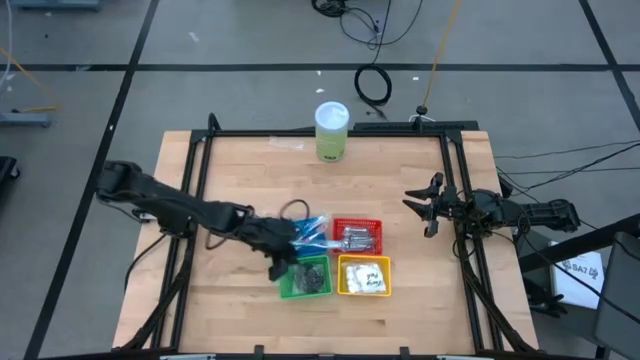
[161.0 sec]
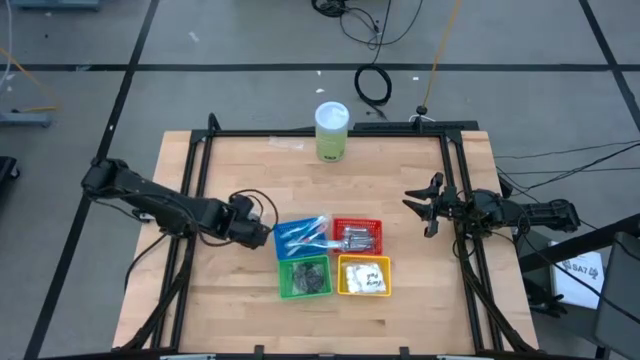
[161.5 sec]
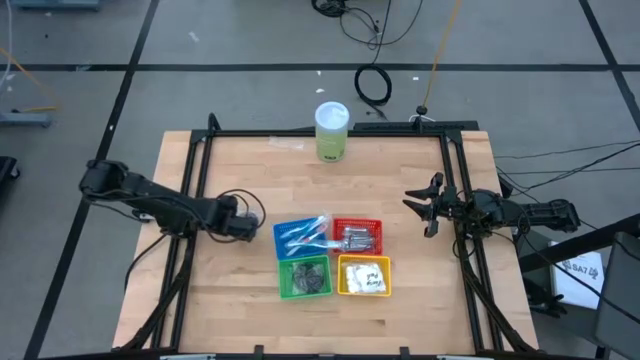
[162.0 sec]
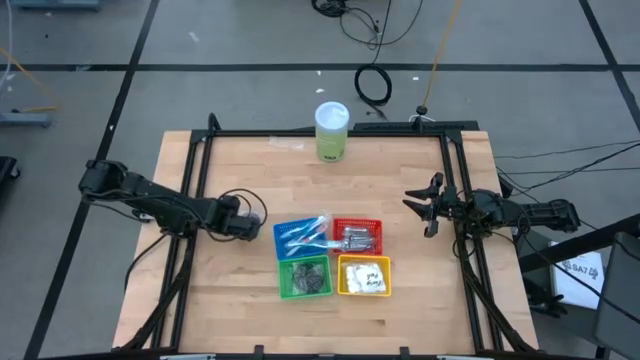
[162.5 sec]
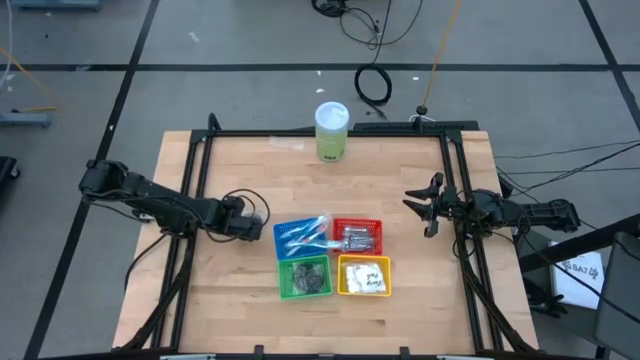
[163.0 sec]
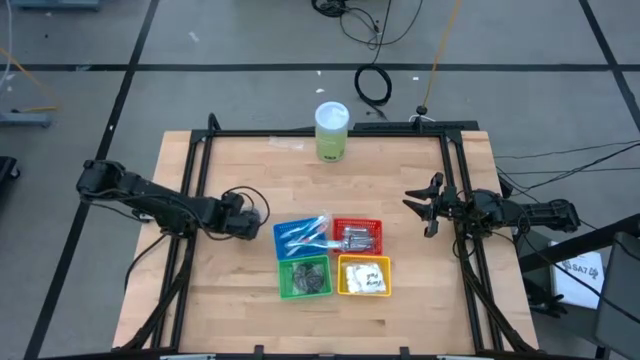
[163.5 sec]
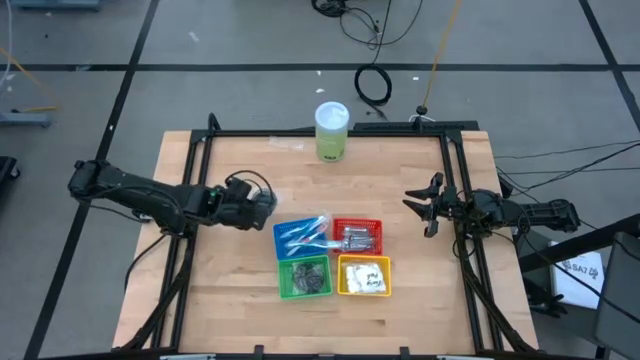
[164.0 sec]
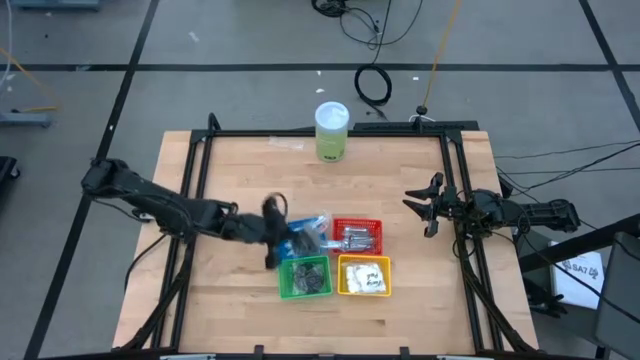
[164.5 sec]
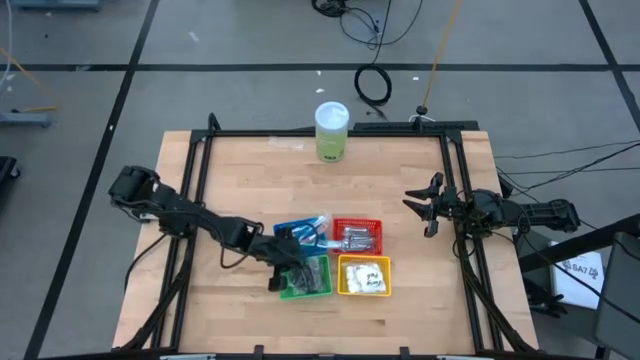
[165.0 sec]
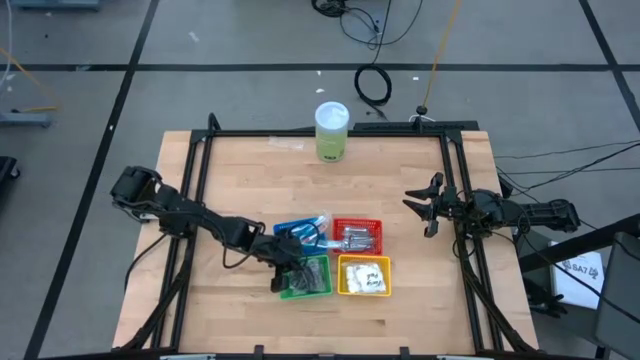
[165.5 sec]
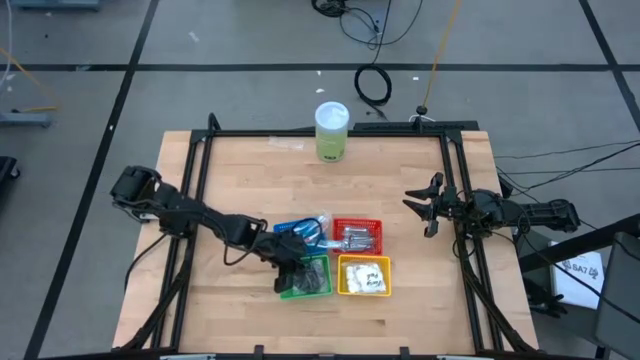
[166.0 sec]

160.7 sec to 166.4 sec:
Task: Pick & Place Travel size toiletries
Put the black hairbrush into the green basket

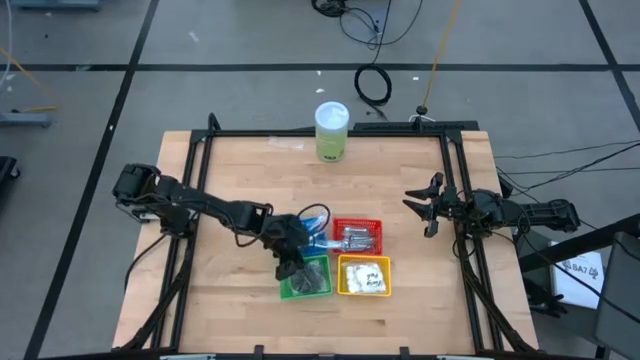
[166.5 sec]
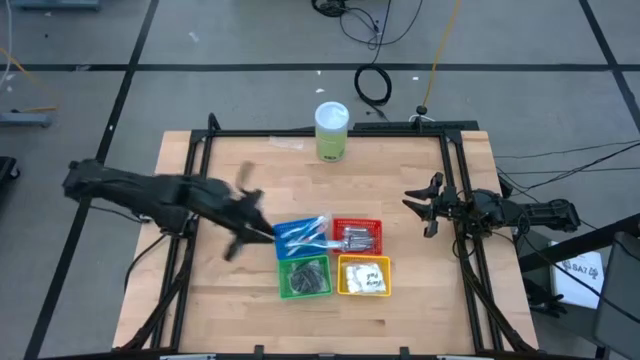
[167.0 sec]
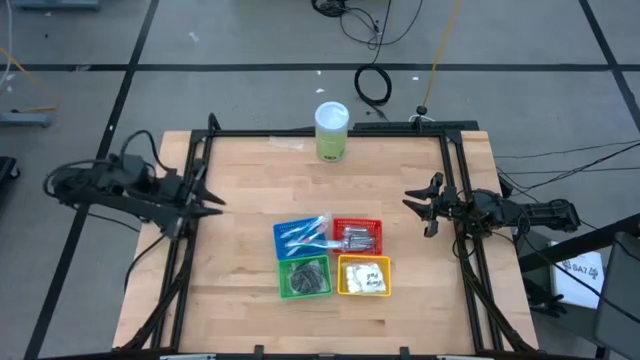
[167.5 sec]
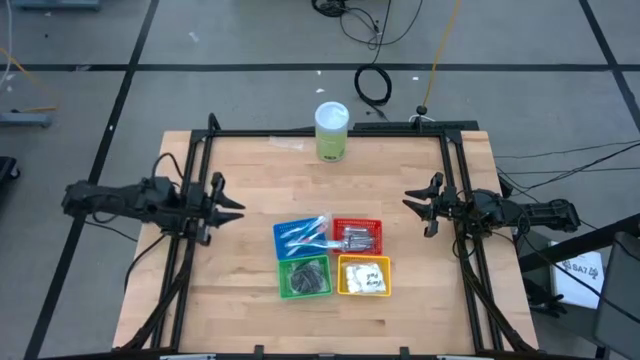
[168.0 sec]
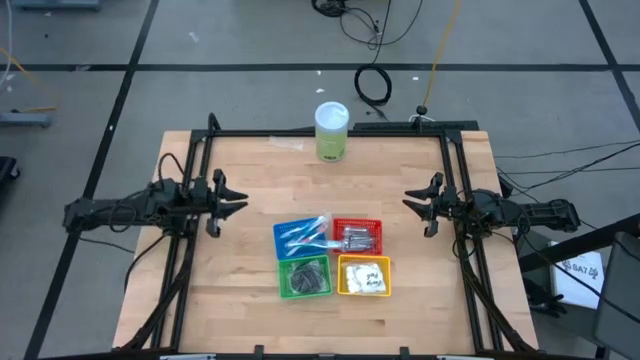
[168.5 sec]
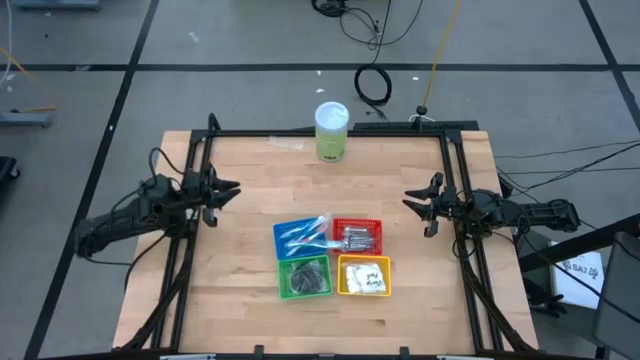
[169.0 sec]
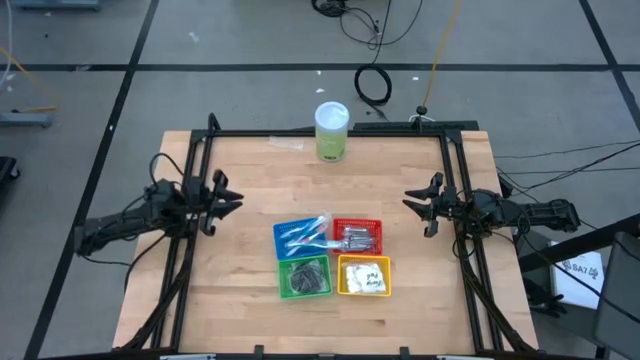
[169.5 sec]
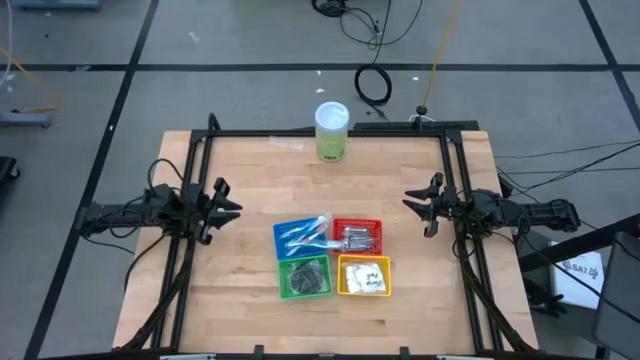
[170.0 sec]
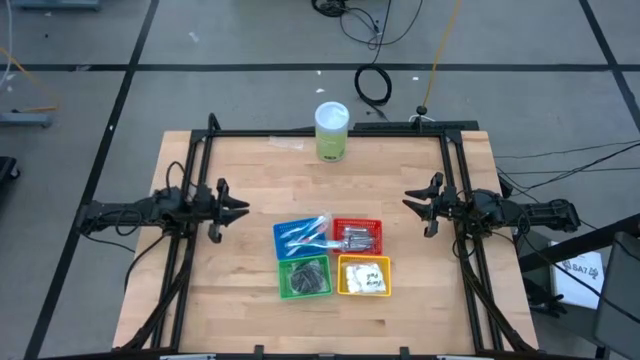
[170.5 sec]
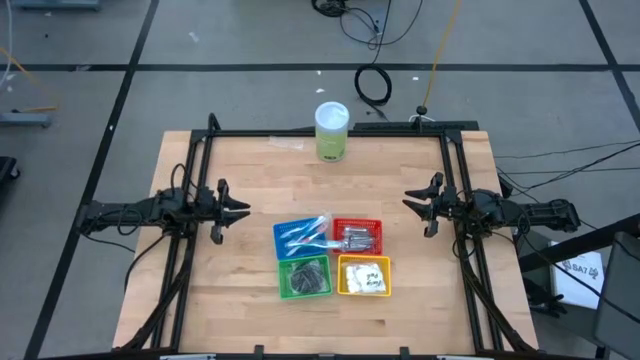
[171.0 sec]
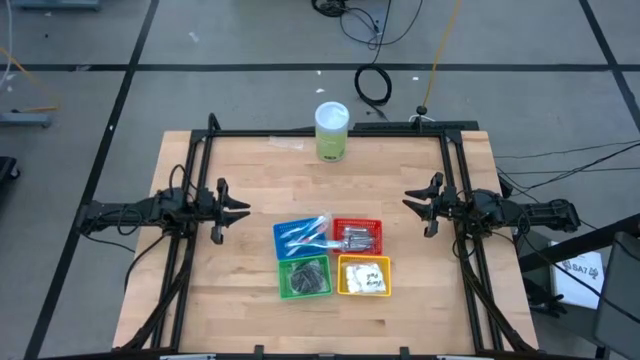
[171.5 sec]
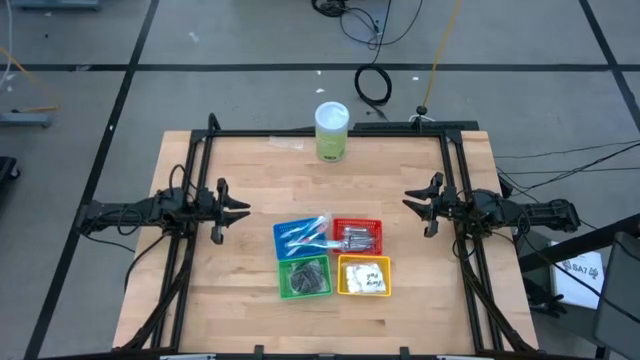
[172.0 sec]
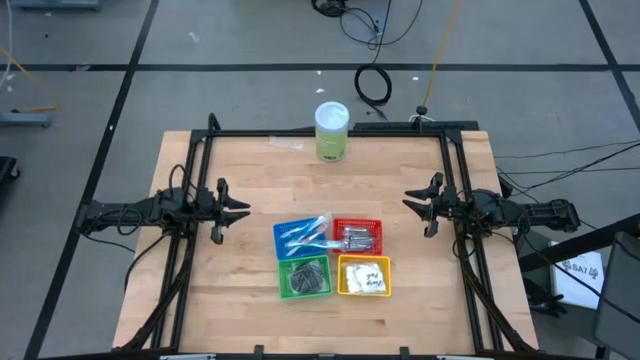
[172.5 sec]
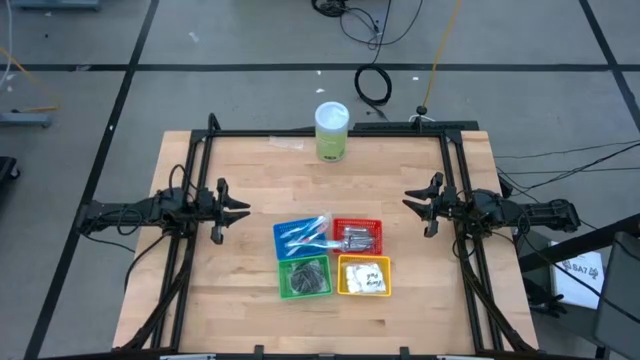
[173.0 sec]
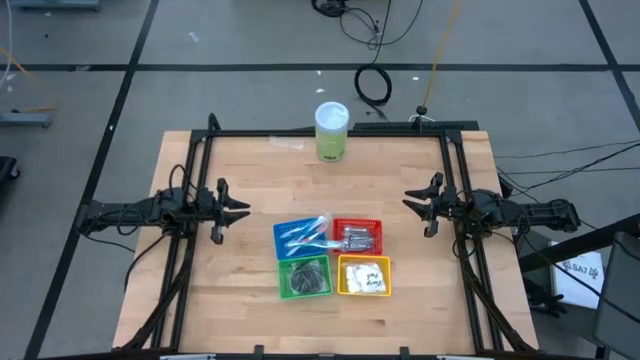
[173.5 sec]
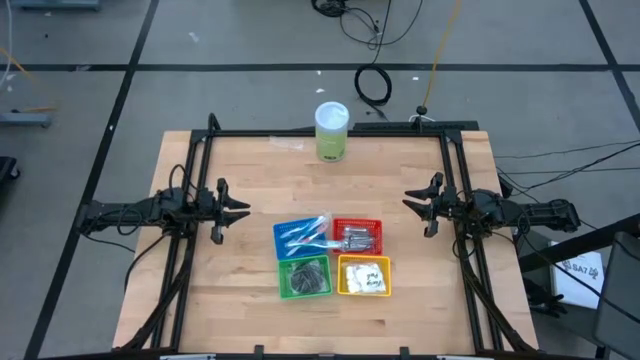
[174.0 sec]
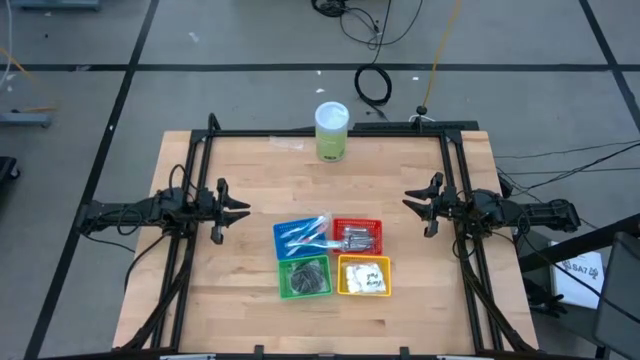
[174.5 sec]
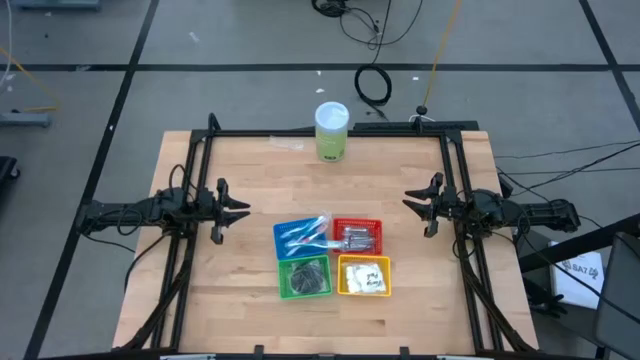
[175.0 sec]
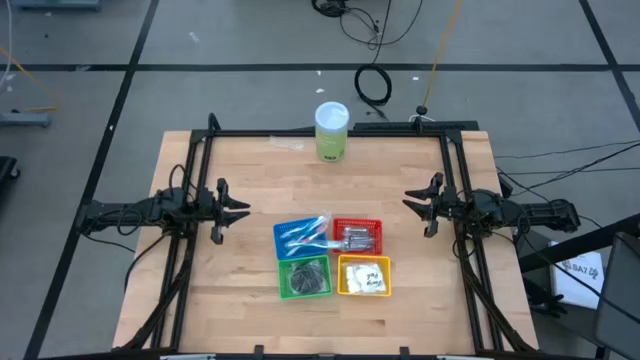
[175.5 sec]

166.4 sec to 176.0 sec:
Return to Home Position

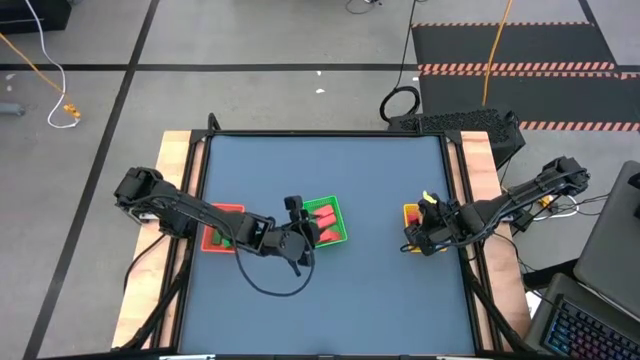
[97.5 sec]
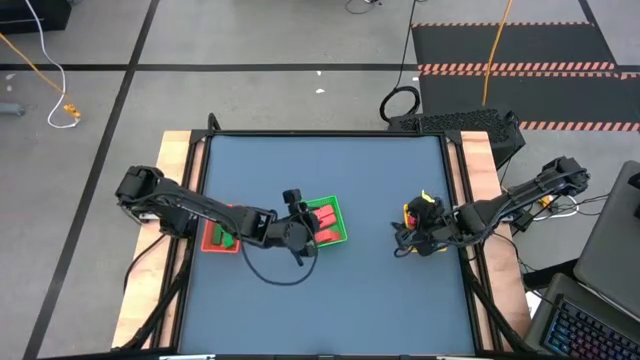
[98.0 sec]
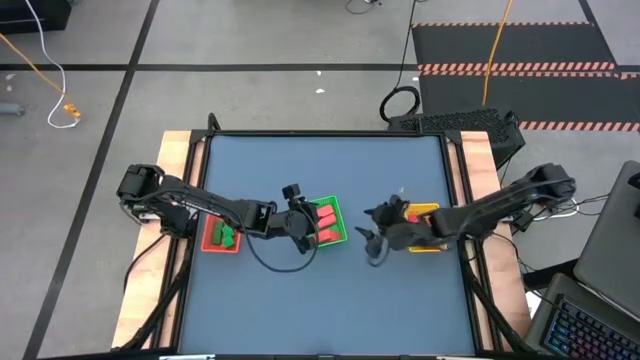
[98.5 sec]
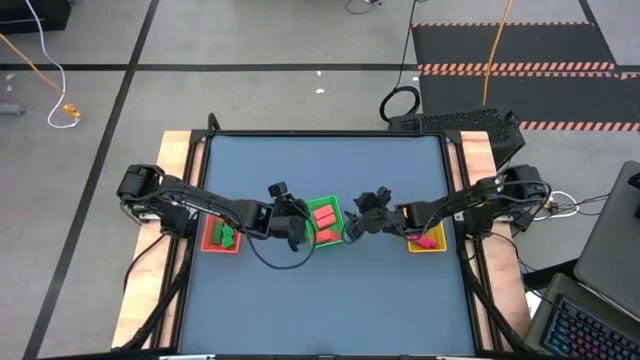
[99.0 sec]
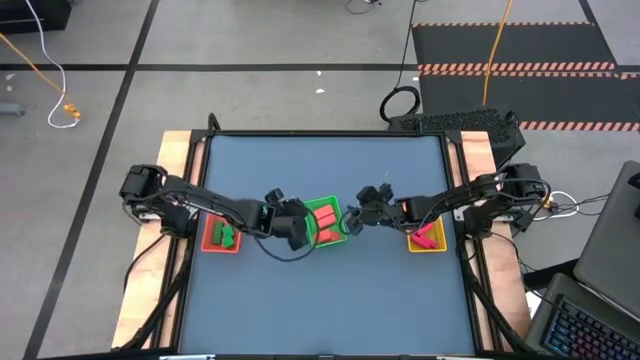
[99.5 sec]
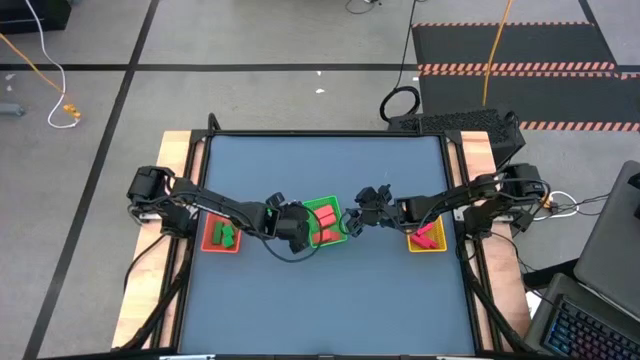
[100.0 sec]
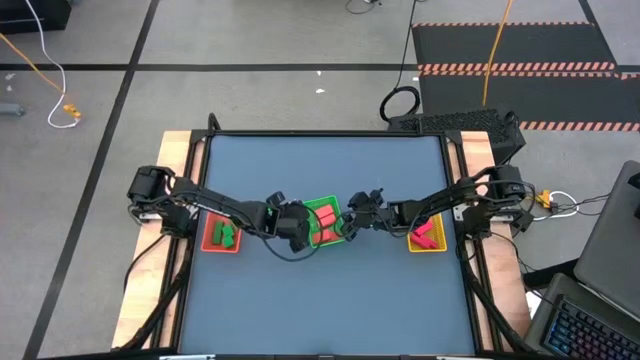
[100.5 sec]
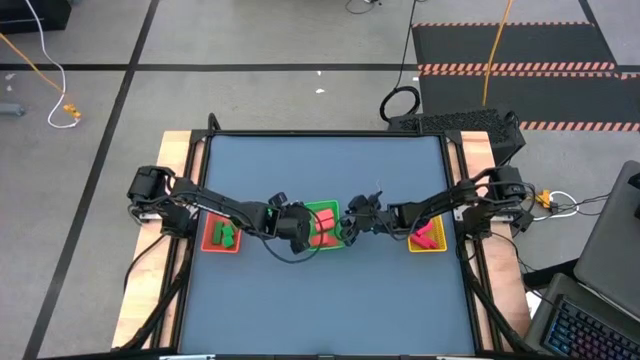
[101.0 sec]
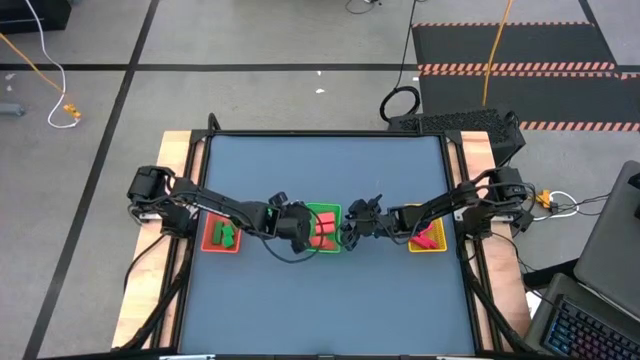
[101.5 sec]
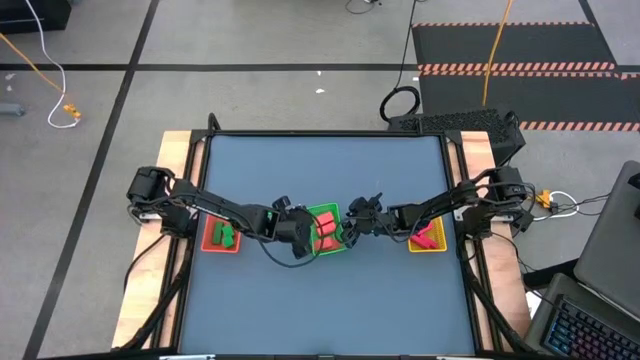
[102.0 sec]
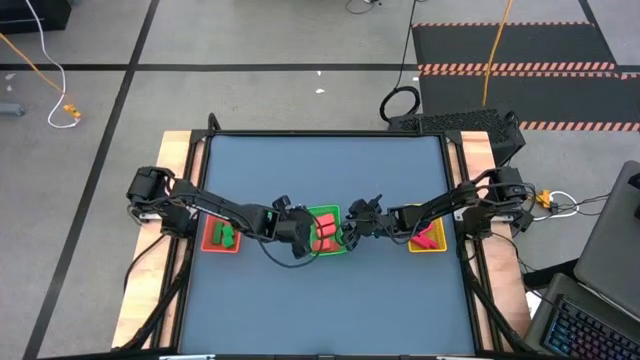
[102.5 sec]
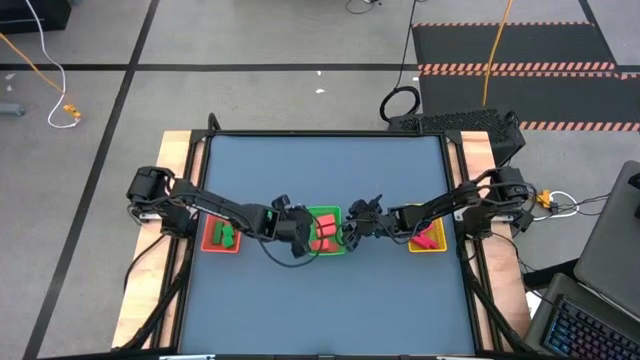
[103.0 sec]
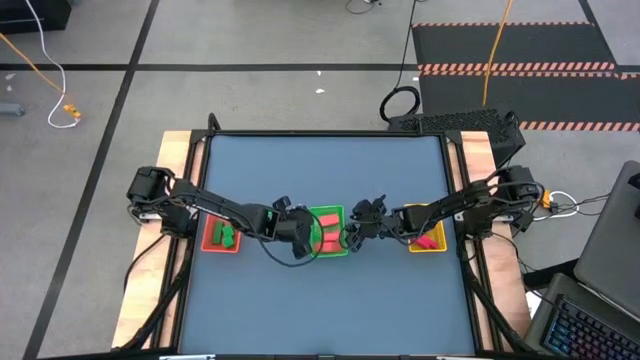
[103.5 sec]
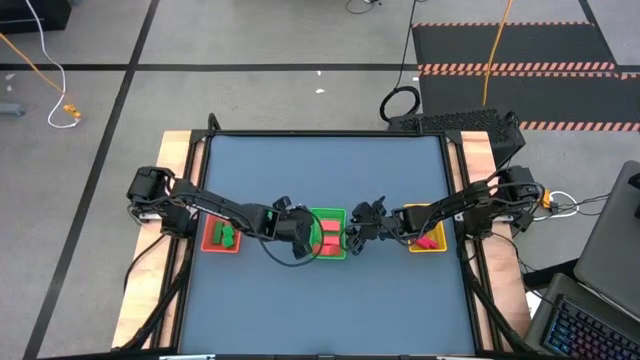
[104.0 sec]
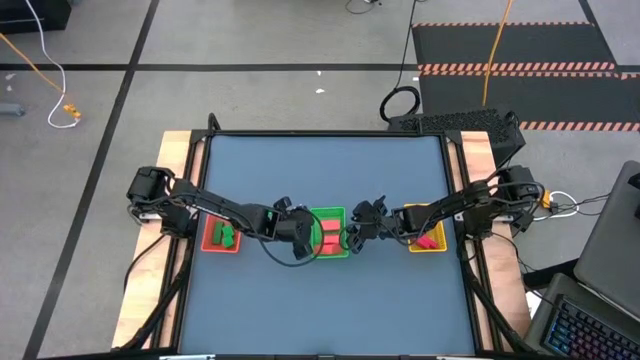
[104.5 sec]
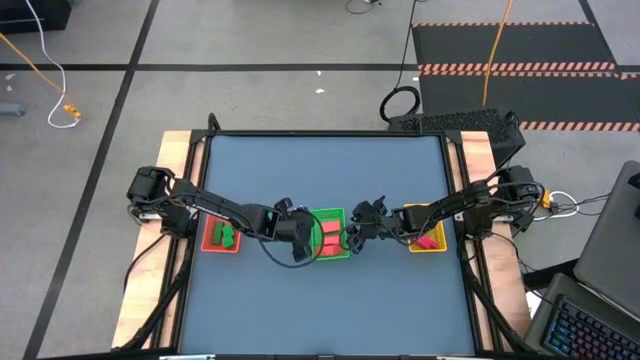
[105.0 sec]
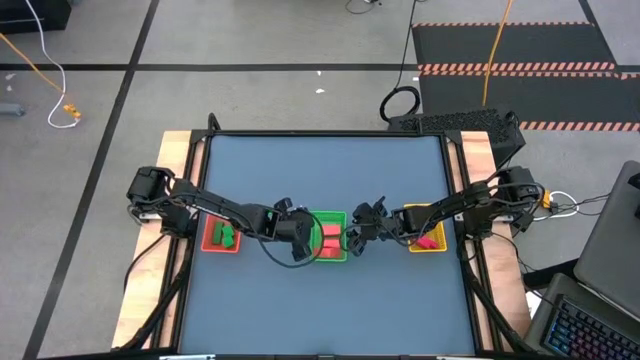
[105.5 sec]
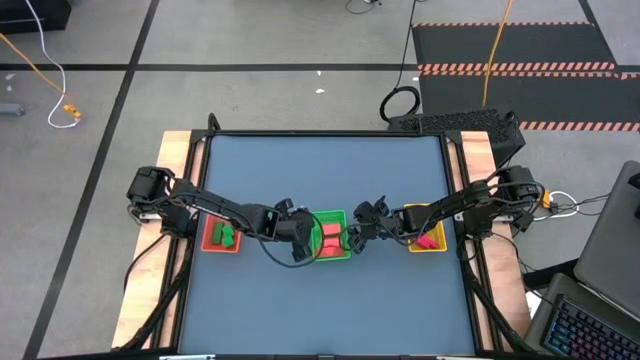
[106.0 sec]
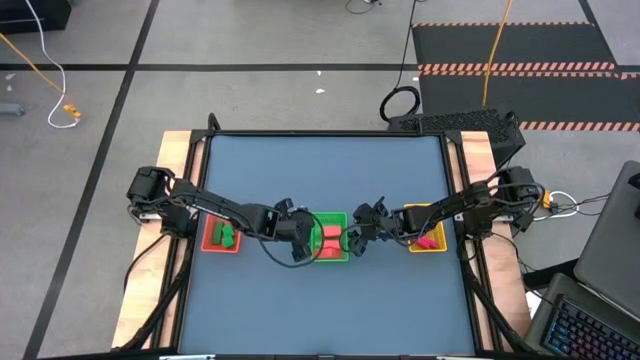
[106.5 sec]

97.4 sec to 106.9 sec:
Task: Sort & place blocks by color
Adjust the green bin
